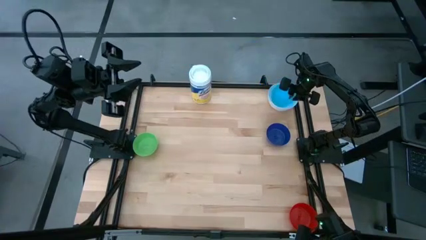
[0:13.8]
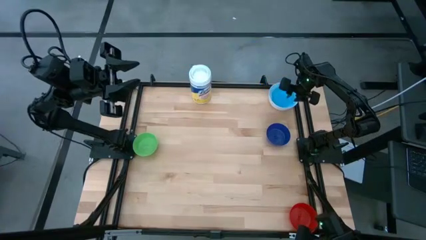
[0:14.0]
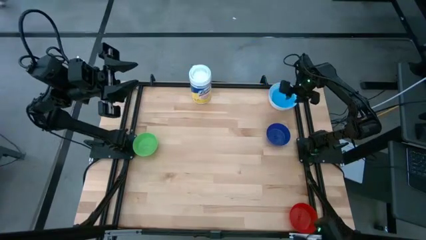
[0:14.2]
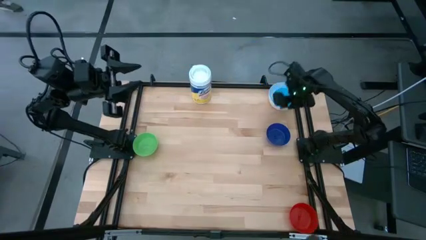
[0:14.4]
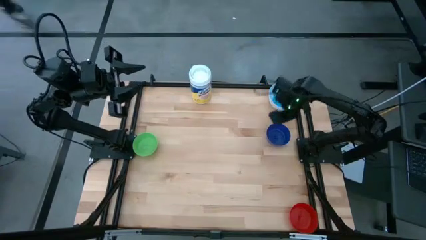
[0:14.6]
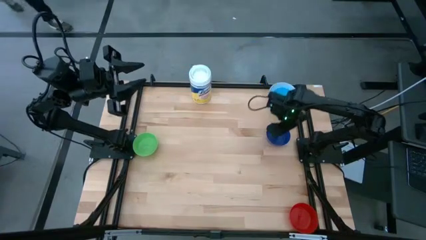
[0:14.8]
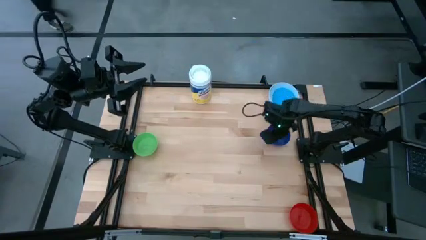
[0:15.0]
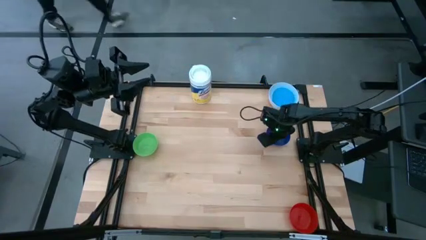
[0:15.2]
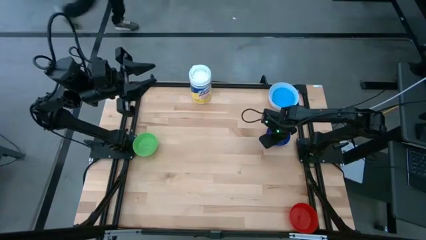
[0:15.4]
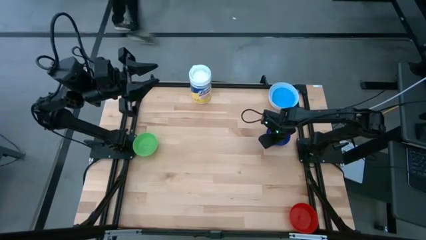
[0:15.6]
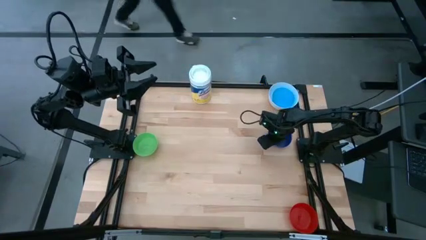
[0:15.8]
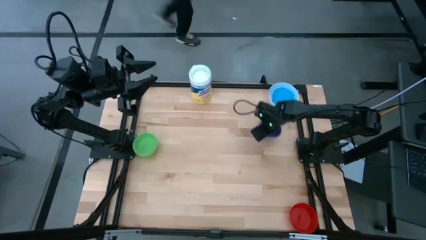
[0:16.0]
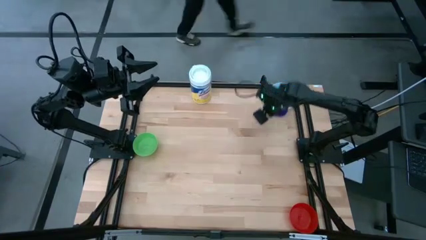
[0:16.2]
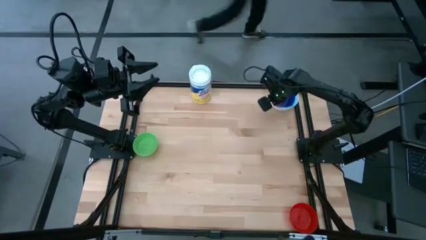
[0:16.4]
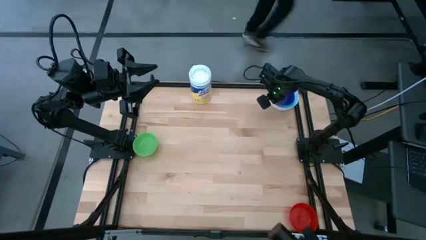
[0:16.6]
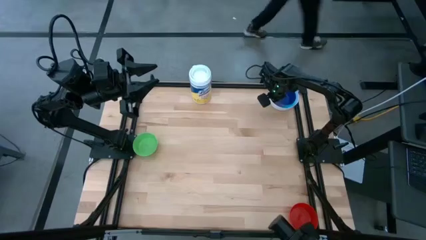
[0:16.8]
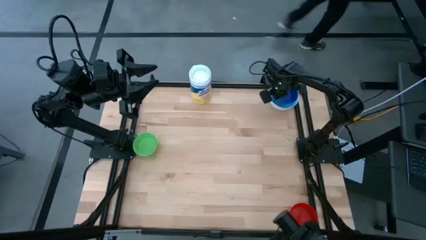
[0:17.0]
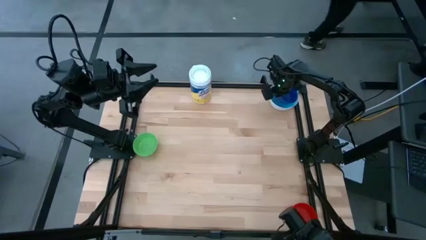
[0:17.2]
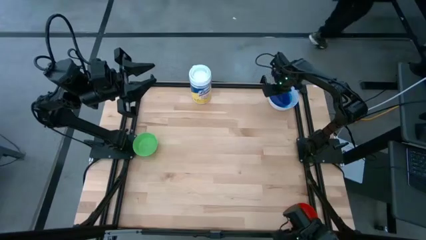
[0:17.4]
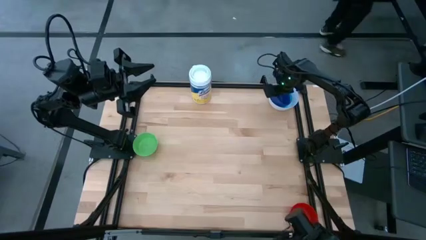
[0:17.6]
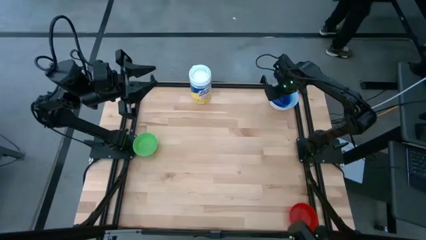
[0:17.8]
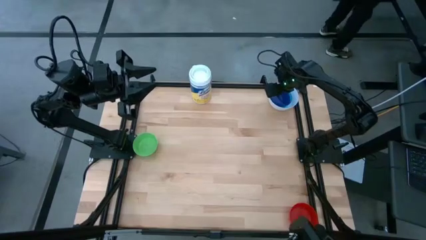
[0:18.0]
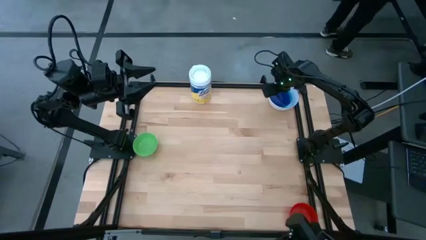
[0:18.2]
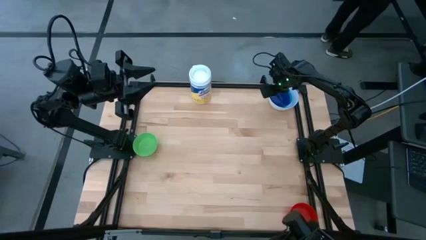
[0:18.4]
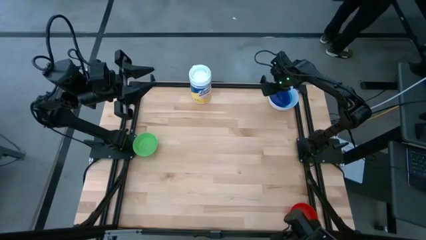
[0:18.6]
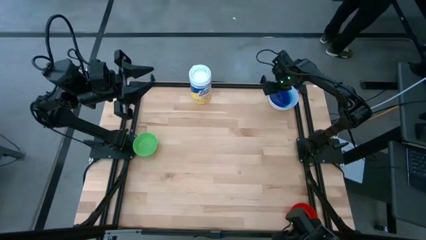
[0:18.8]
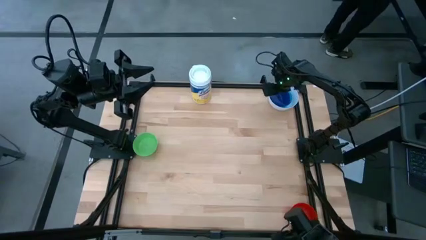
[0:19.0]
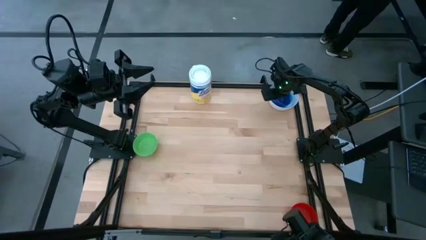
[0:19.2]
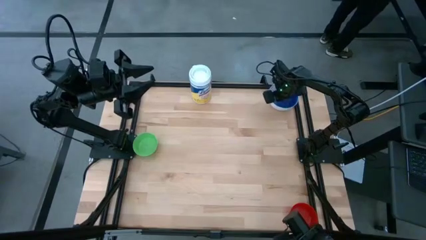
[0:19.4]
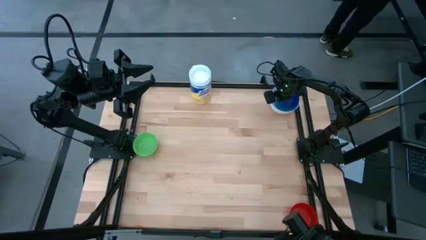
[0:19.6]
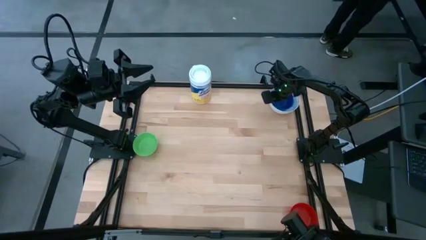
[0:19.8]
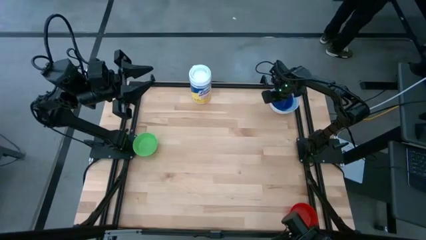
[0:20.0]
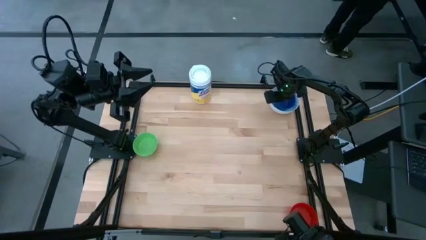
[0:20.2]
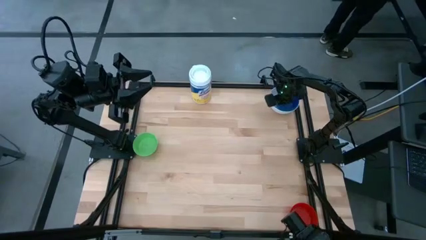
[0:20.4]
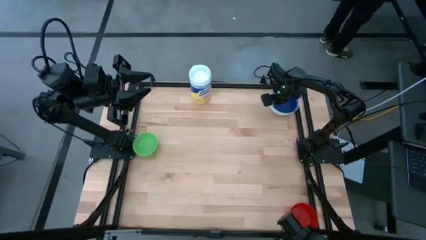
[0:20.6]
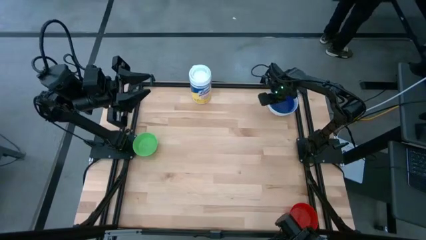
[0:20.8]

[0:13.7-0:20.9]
Stack the blue bowl on the light blue bowl

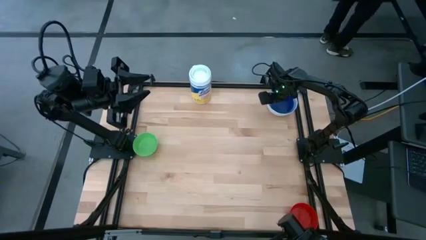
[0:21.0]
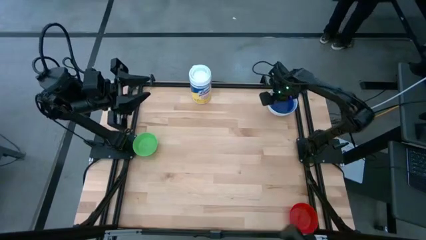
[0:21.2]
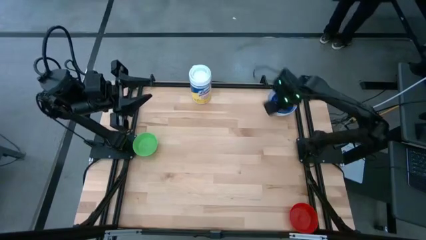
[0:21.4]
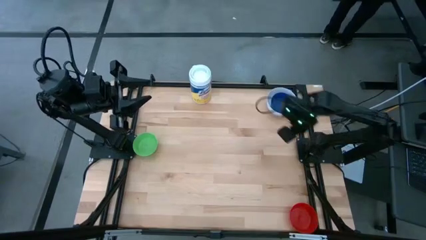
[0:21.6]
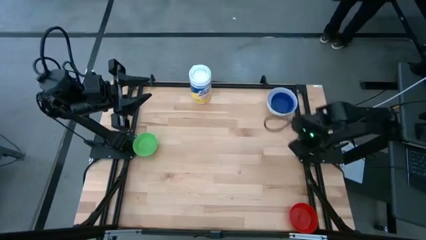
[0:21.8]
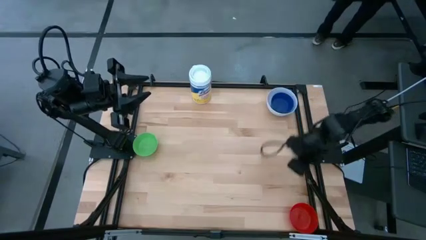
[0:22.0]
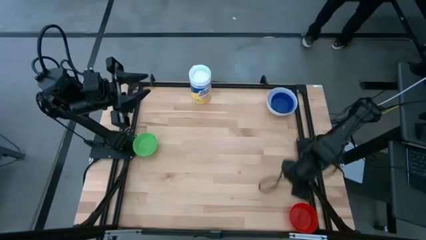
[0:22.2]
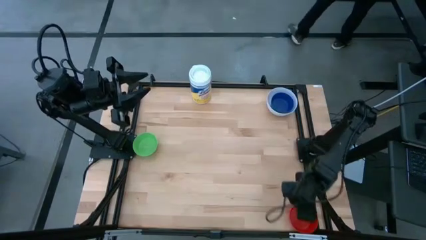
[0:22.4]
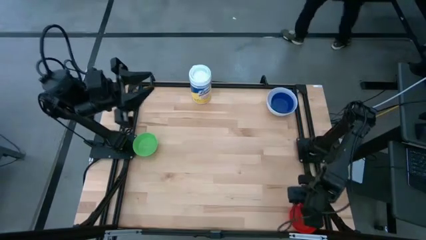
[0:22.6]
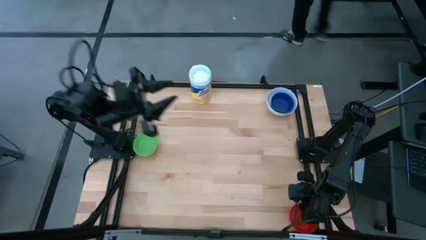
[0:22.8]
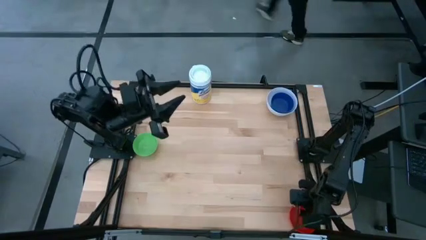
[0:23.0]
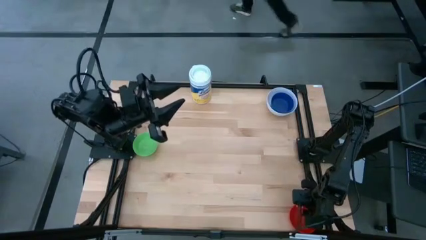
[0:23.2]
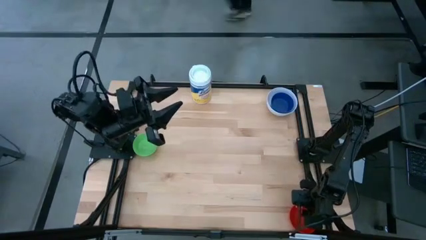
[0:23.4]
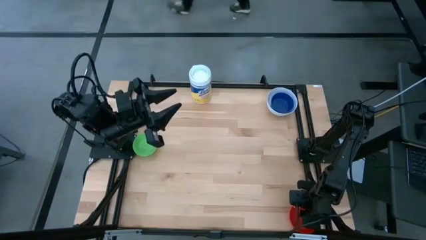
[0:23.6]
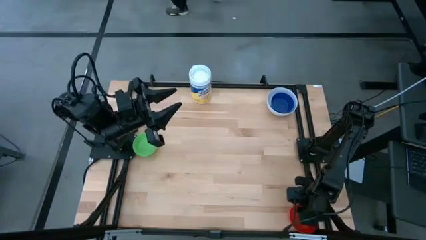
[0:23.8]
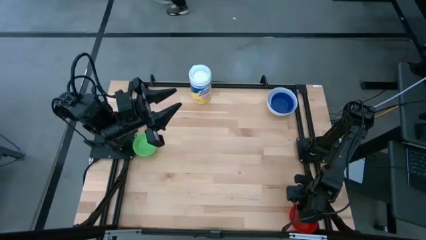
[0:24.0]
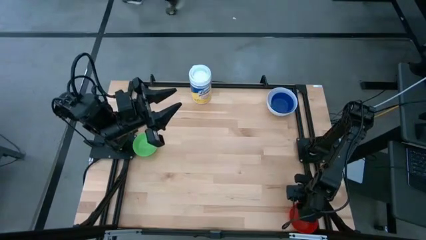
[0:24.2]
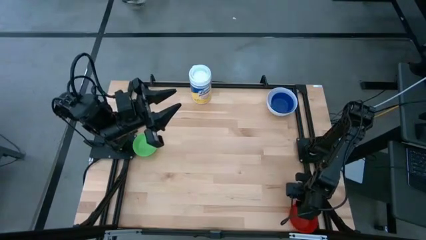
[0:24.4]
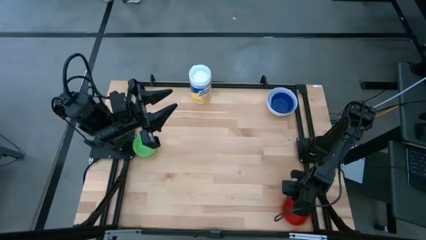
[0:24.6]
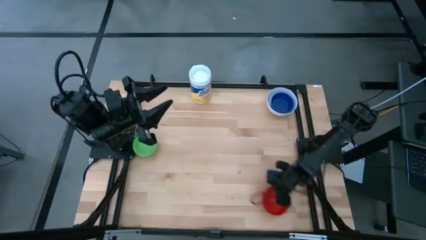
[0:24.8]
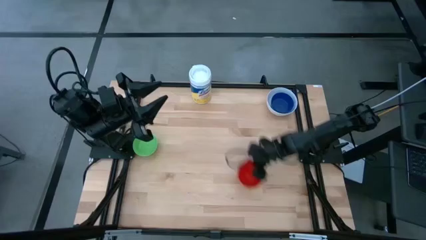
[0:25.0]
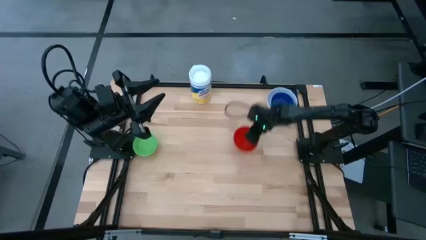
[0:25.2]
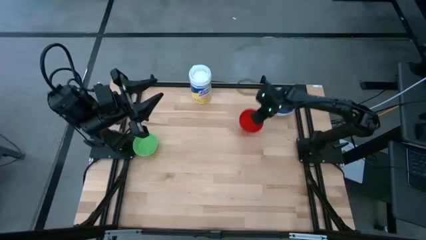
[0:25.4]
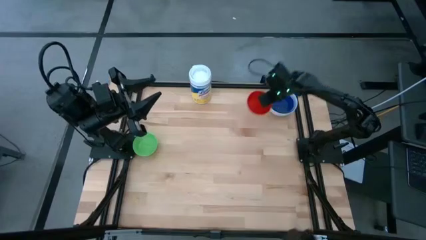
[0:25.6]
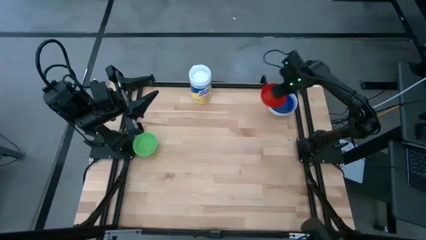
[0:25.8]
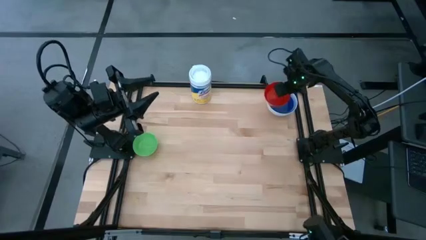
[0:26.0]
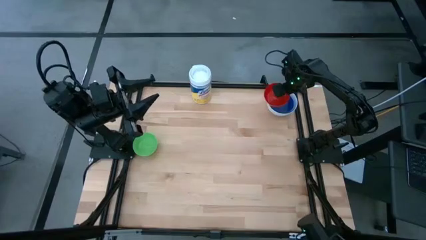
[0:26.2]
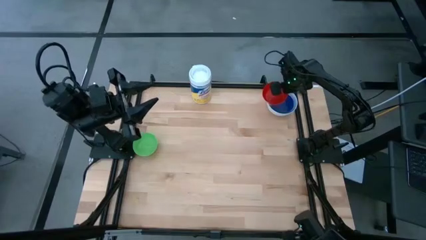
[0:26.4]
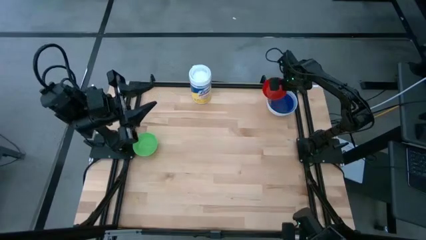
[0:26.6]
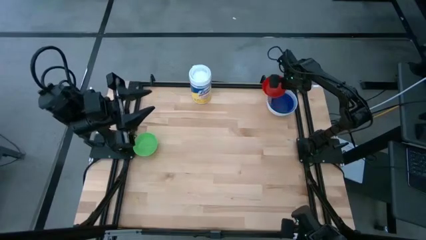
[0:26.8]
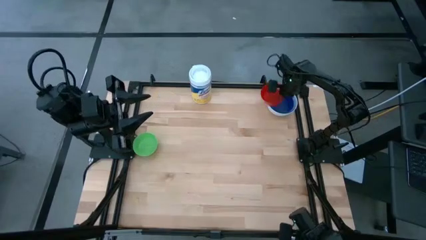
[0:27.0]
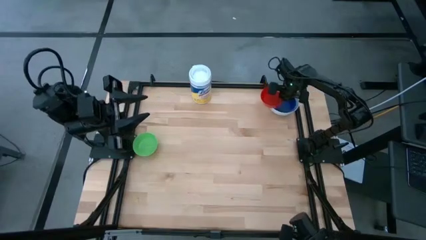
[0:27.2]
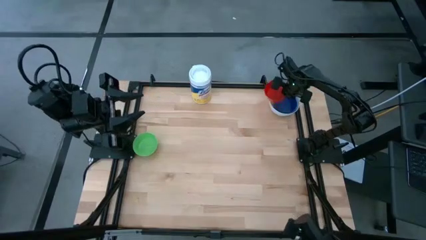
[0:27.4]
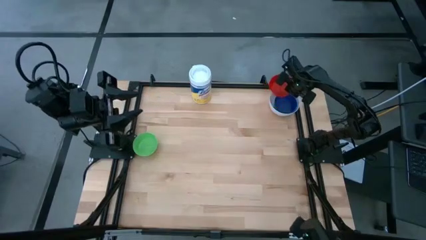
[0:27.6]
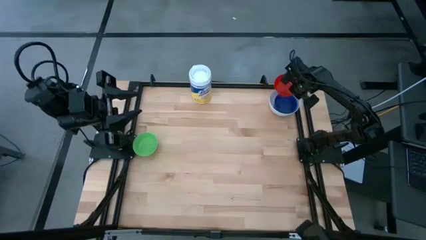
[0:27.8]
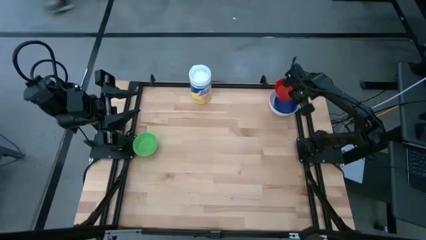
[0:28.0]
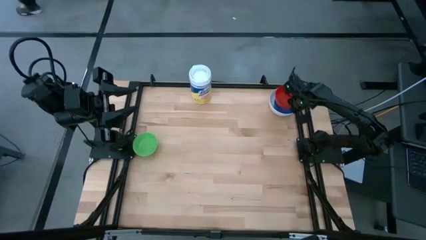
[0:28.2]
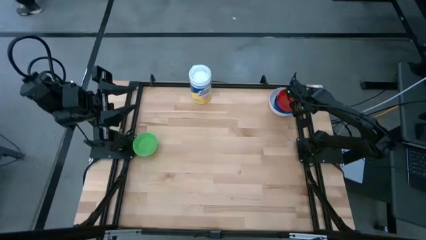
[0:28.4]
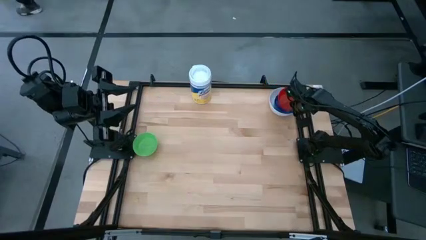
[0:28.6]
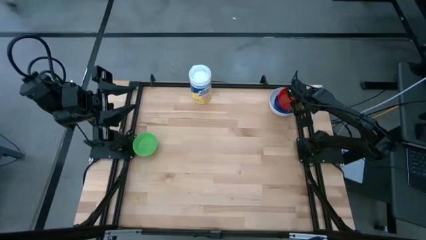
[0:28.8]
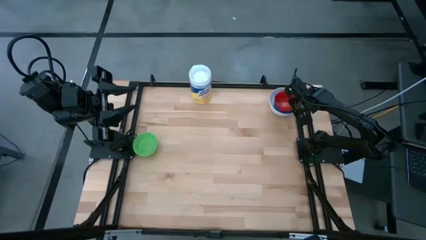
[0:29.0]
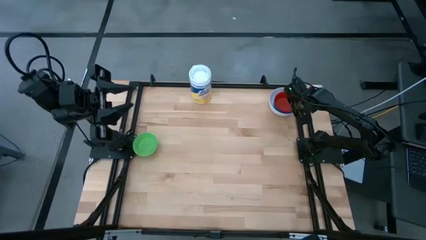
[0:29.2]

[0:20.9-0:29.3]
Stack the red bowl on the blue bowl
